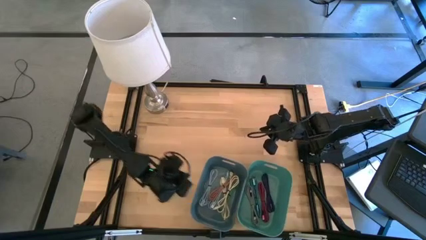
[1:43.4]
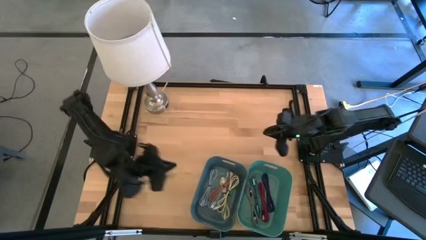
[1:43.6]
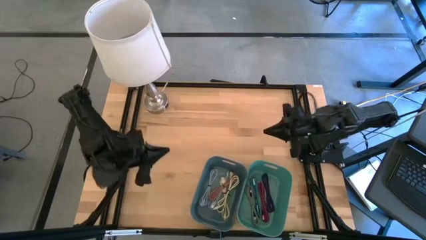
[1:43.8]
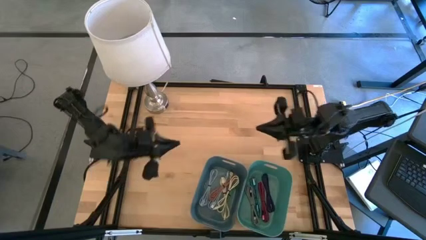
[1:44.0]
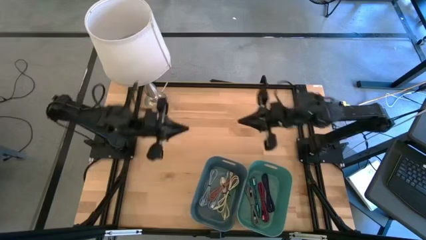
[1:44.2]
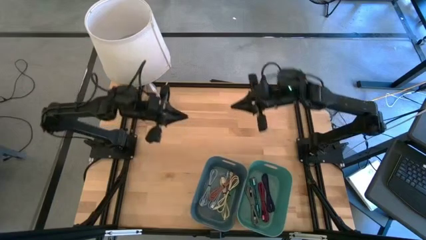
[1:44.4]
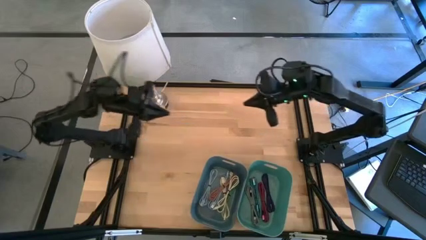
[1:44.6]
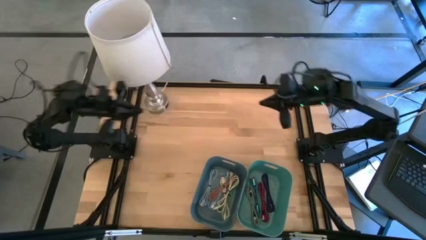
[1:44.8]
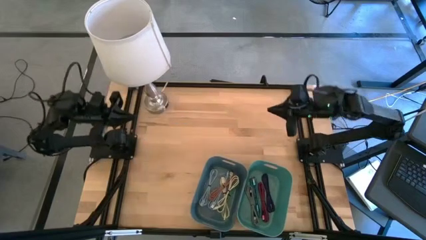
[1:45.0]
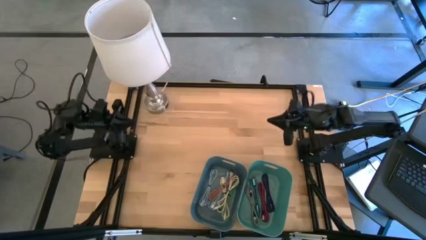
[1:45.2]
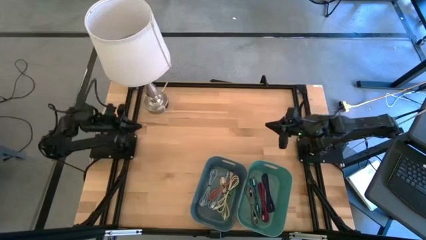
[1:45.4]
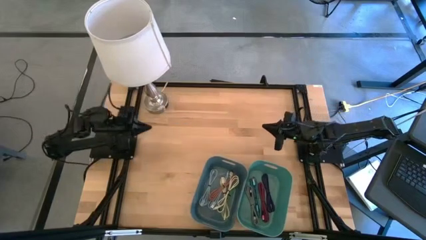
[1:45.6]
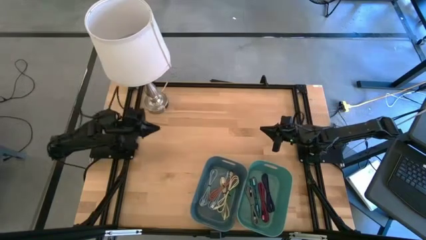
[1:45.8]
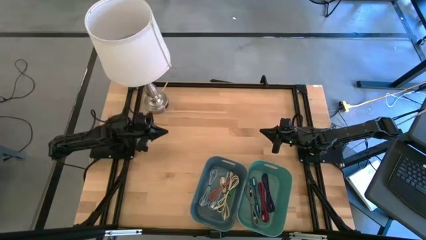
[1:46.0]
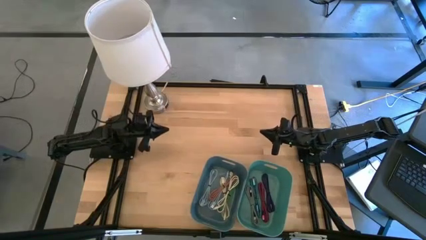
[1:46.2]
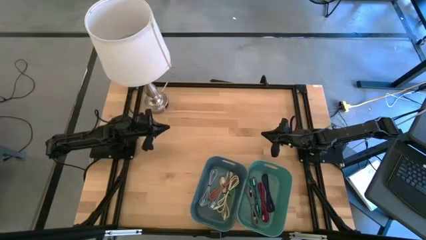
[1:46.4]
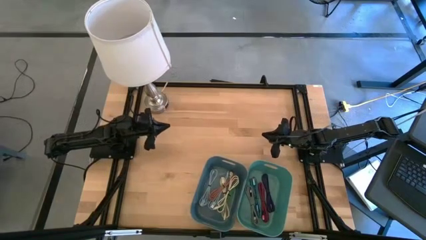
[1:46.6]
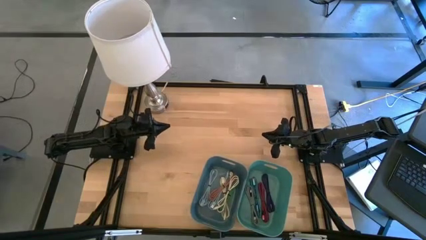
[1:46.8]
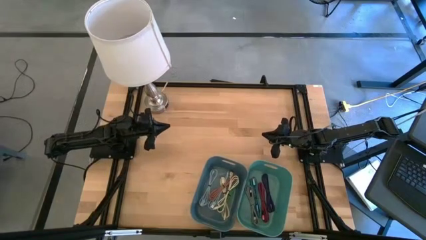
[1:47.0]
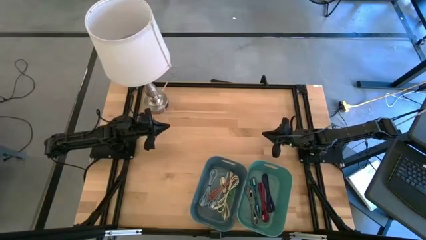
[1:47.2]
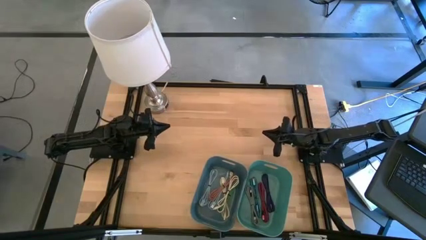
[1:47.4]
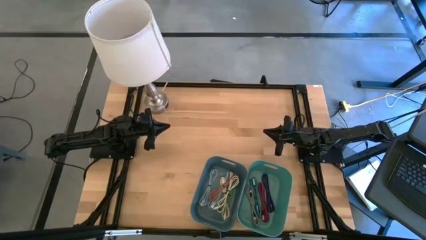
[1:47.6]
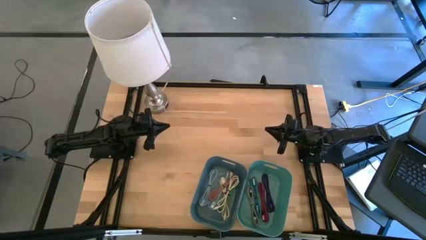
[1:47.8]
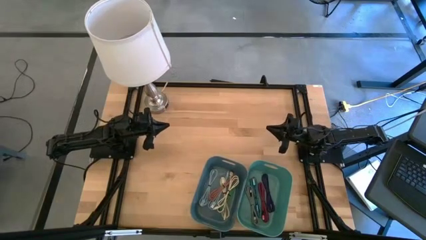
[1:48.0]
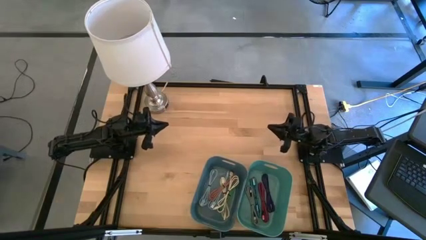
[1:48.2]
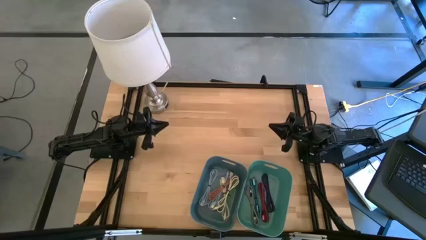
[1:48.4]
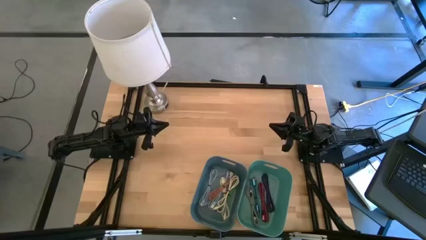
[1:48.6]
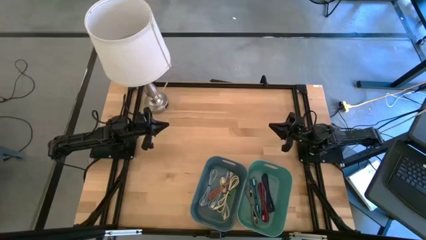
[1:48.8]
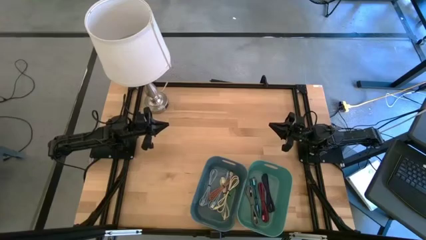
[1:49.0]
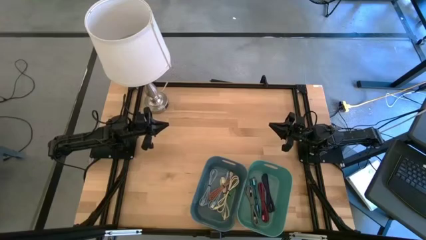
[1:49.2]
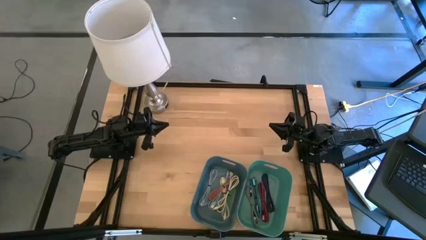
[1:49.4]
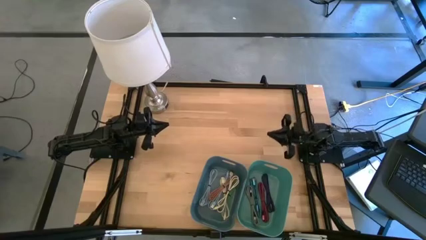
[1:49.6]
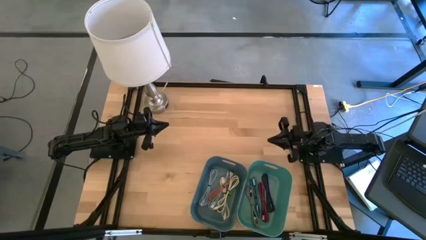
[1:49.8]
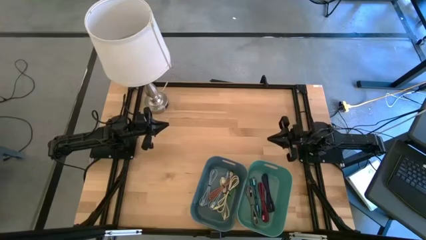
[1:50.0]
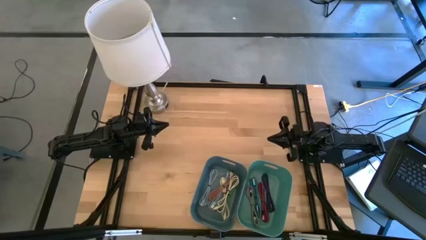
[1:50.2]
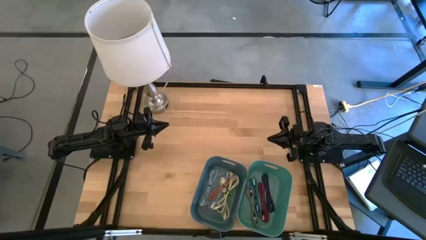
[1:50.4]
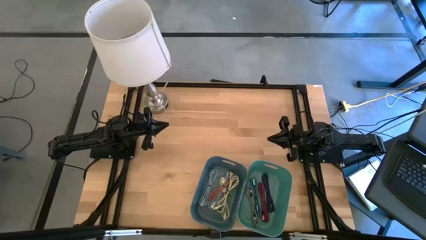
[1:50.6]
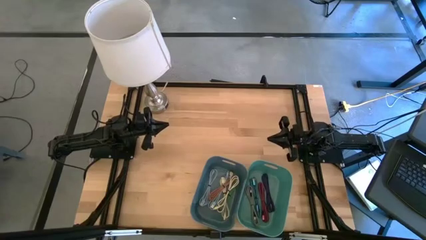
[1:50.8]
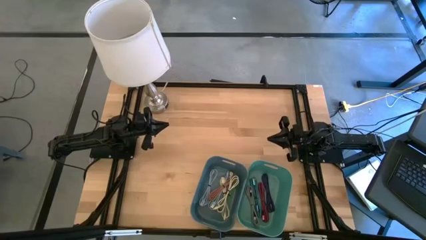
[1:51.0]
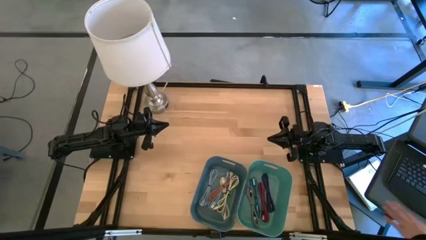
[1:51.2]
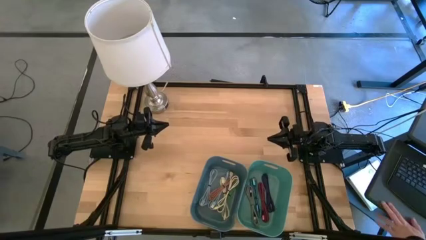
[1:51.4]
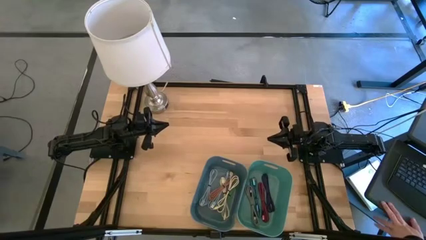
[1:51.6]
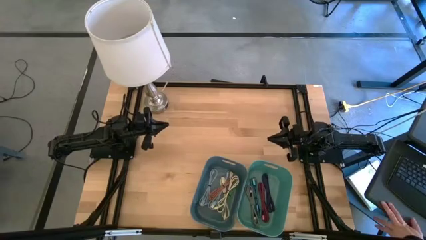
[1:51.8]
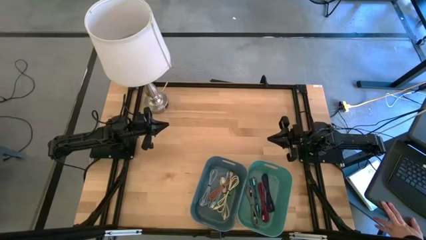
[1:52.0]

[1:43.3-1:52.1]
Return to Home Position

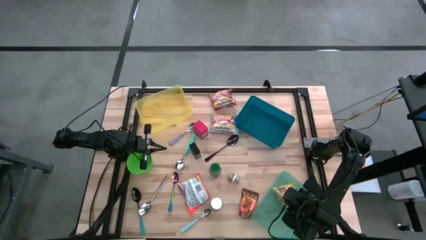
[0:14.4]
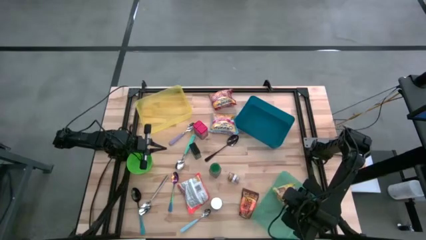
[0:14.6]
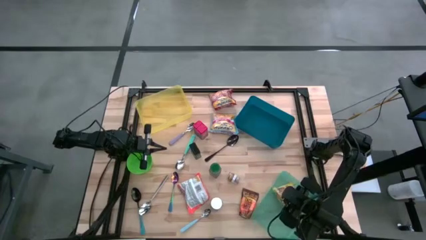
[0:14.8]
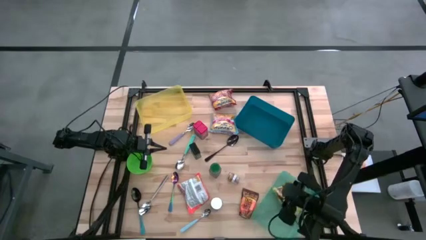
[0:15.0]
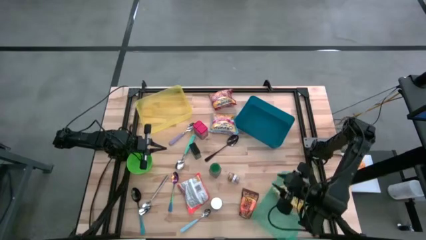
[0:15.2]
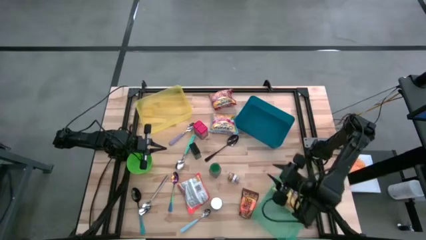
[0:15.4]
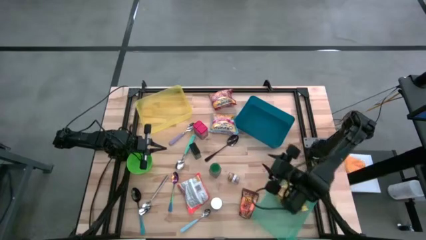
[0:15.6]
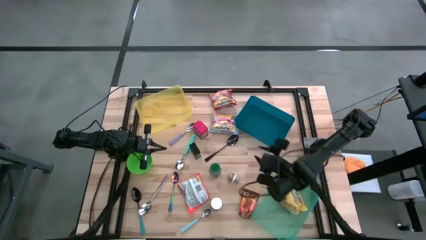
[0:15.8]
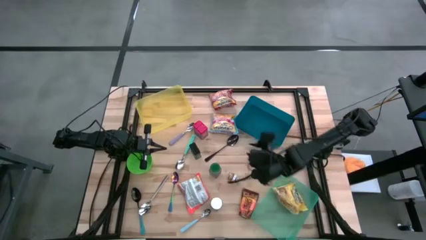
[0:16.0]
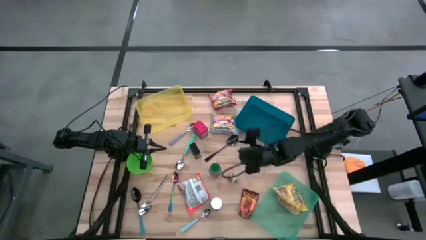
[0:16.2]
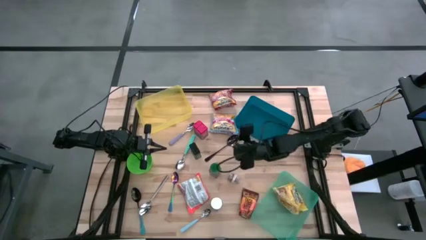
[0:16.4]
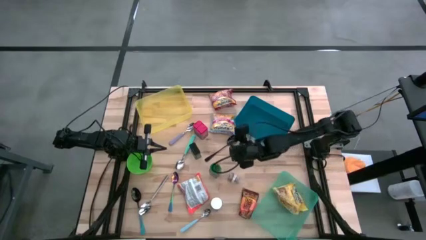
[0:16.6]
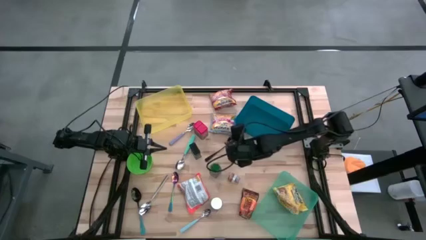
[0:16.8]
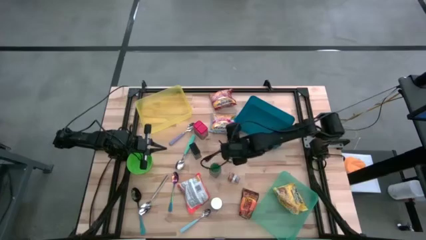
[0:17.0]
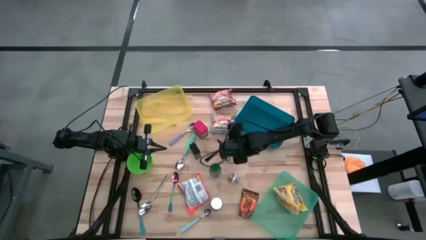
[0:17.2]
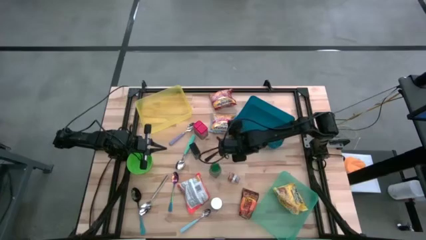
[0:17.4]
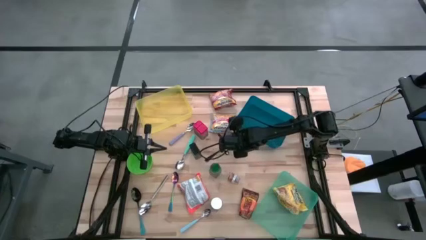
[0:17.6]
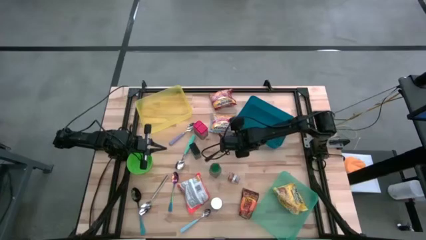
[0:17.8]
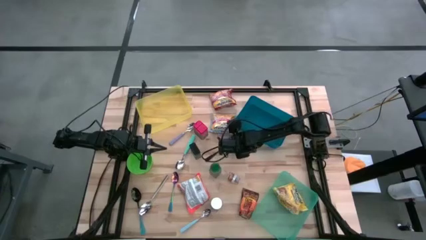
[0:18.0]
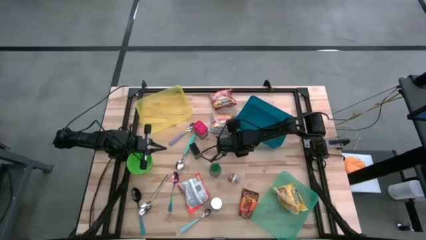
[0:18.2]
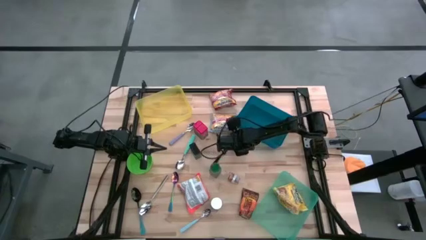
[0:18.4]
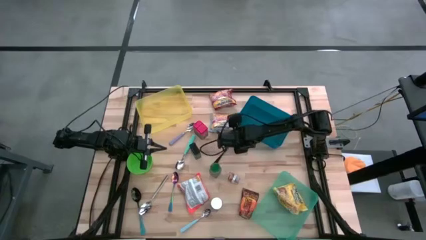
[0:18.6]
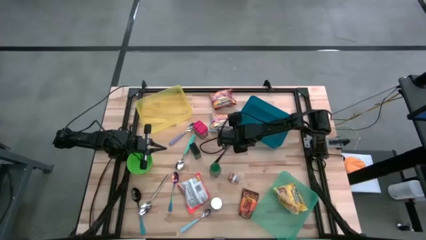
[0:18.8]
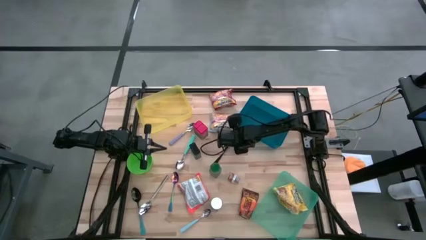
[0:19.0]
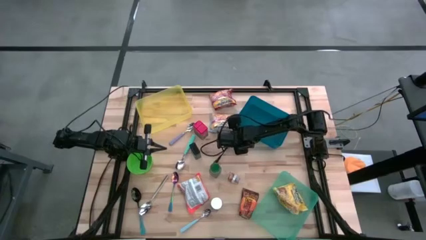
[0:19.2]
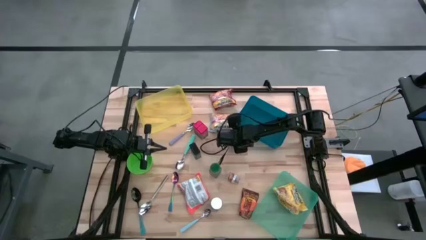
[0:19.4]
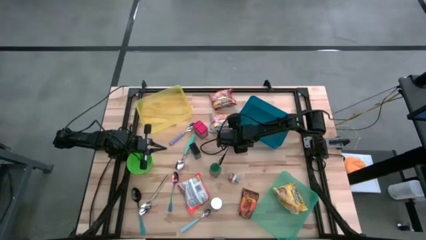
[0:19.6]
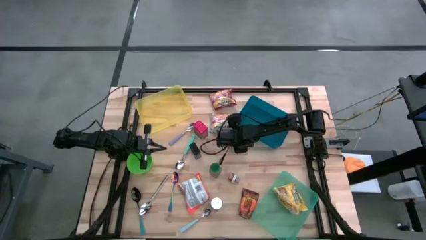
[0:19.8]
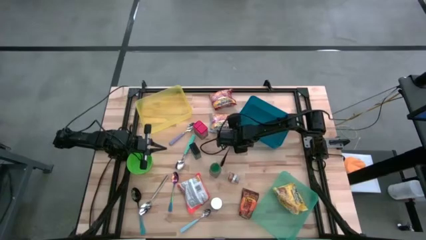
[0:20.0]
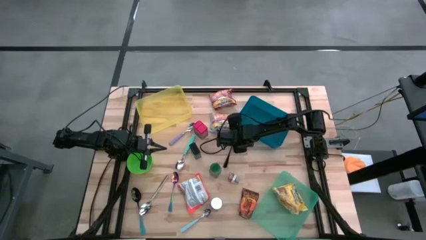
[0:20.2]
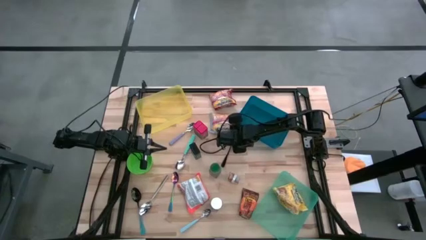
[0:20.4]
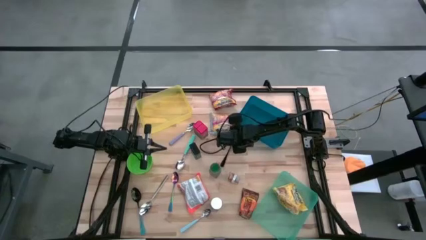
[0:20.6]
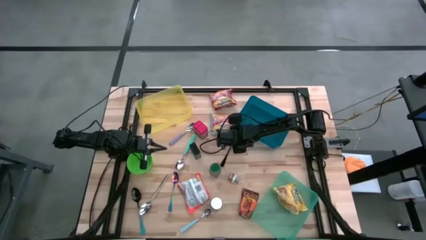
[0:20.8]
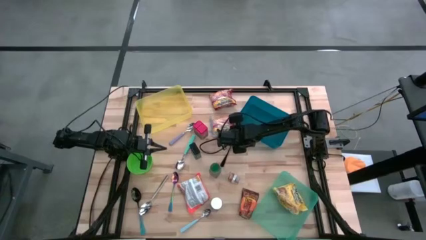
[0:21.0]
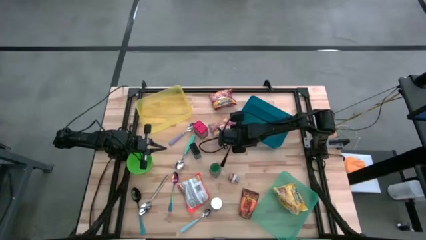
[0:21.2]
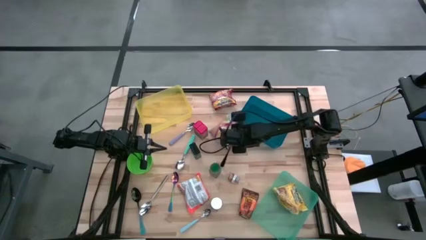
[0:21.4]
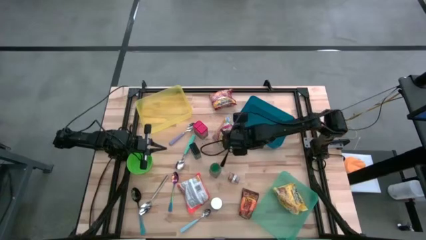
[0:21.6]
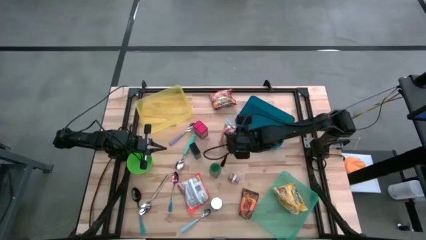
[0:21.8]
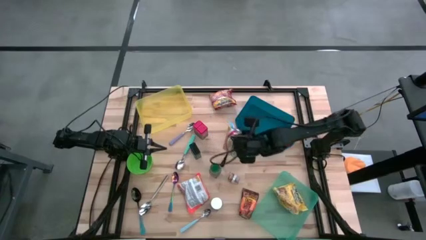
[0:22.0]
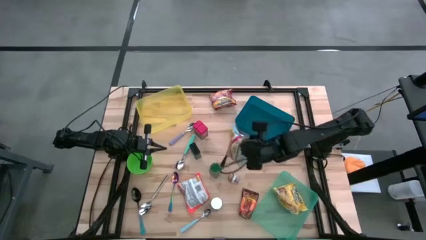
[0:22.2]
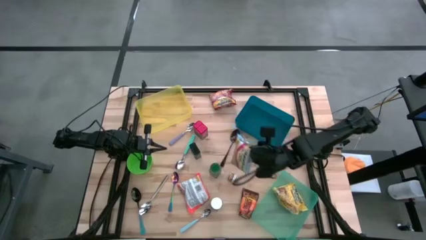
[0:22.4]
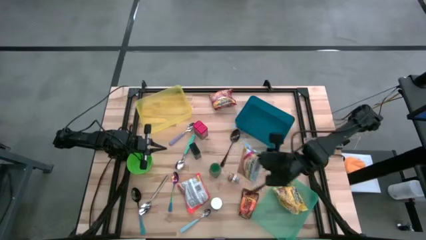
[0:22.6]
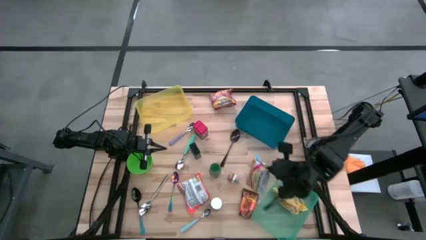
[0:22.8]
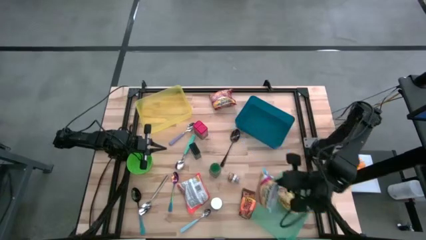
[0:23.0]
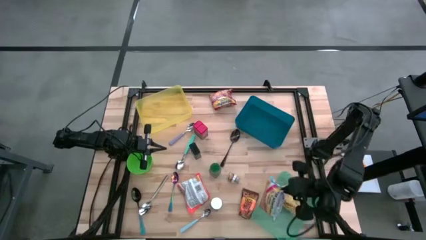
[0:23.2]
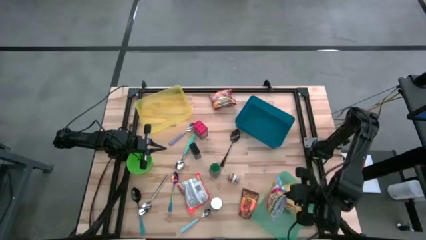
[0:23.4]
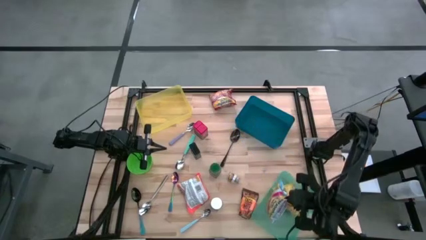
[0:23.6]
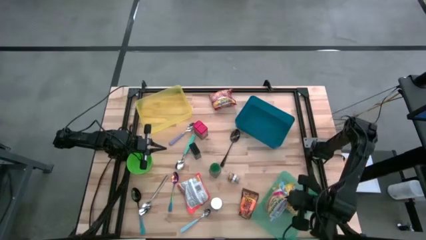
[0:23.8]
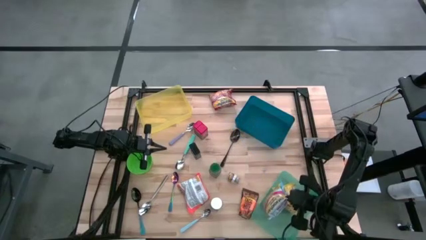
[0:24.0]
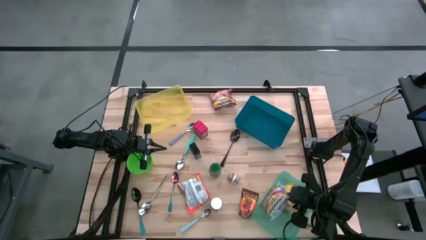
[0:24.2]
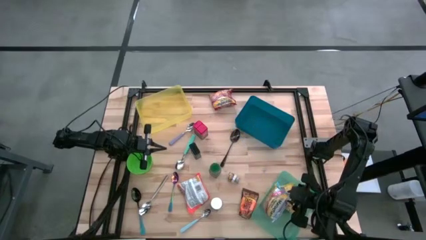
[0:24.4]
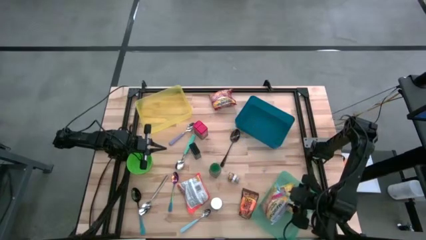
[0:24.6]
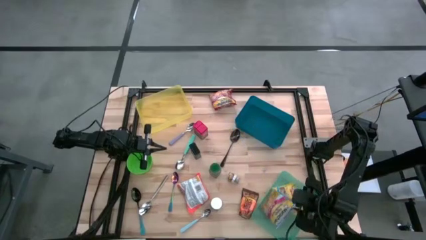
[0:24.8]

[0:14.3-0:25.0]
Put the blue noodle pack into the green bin
